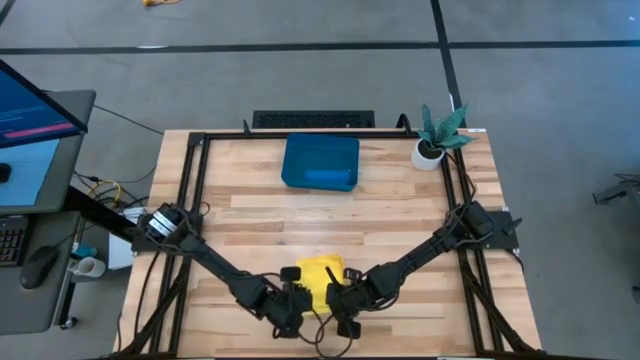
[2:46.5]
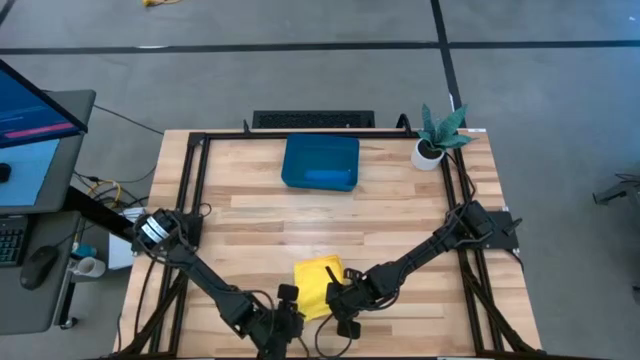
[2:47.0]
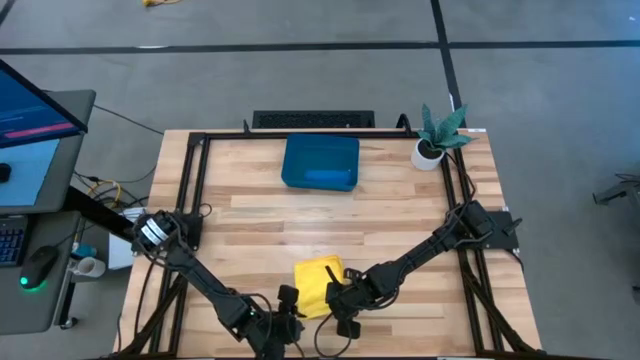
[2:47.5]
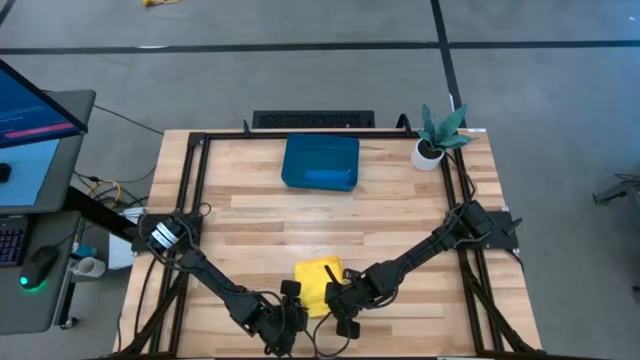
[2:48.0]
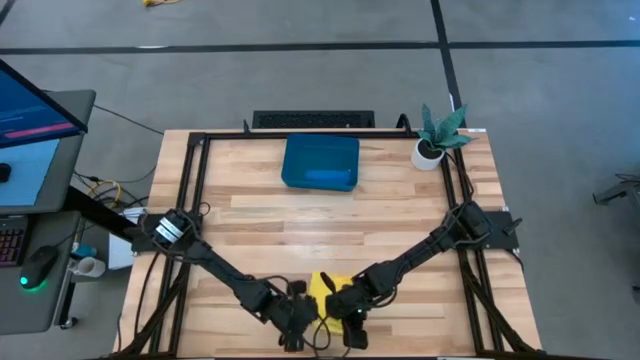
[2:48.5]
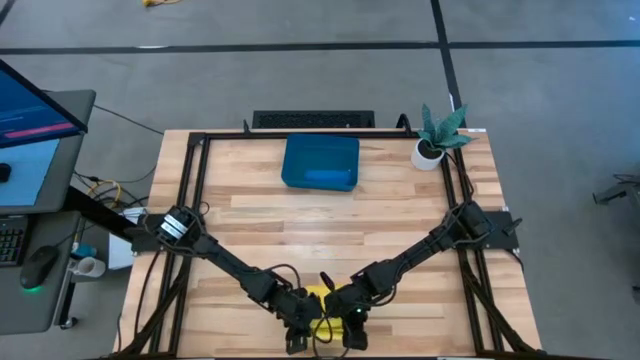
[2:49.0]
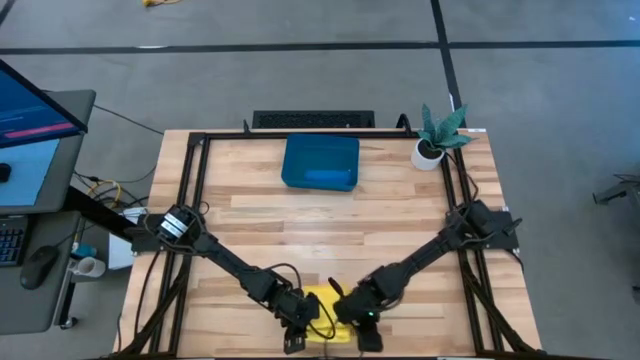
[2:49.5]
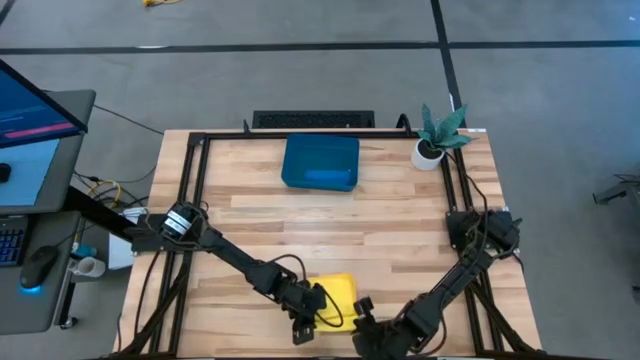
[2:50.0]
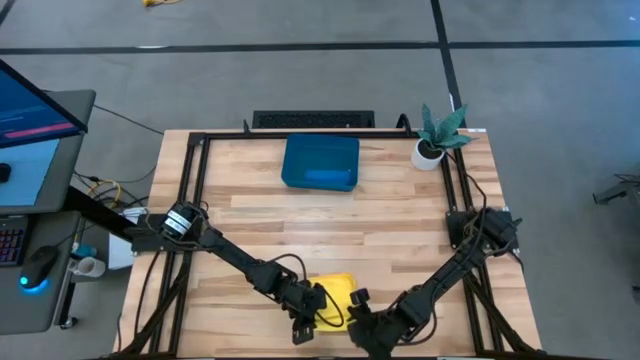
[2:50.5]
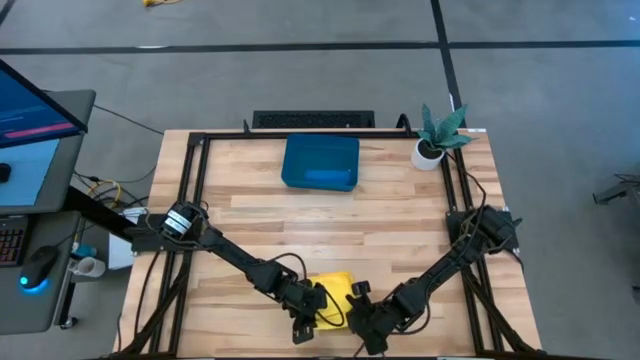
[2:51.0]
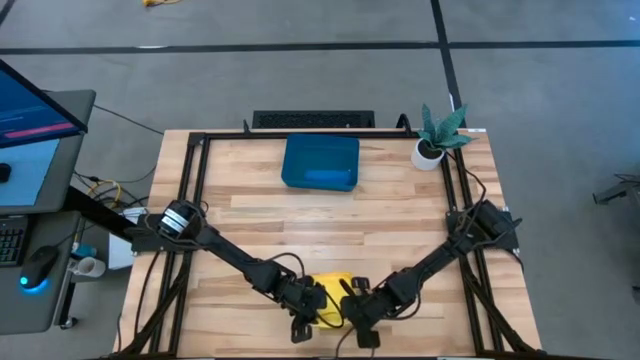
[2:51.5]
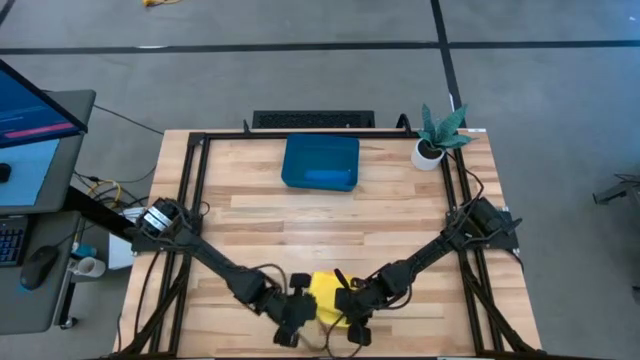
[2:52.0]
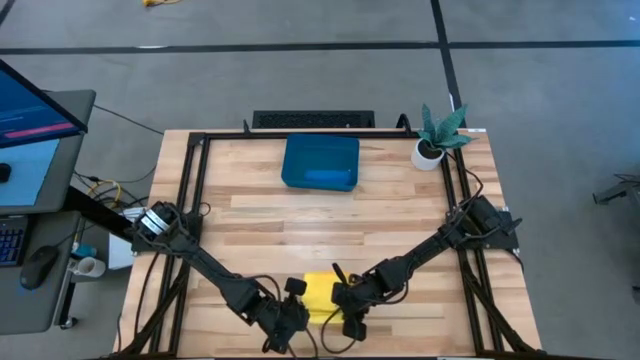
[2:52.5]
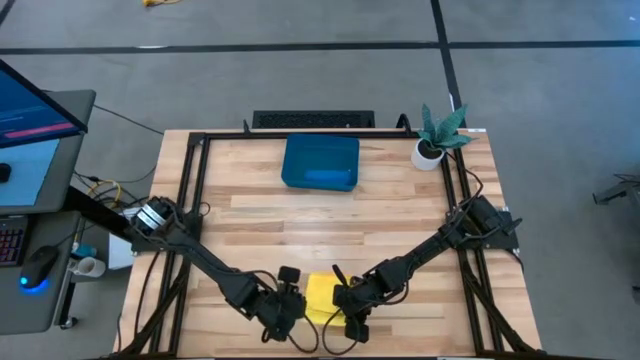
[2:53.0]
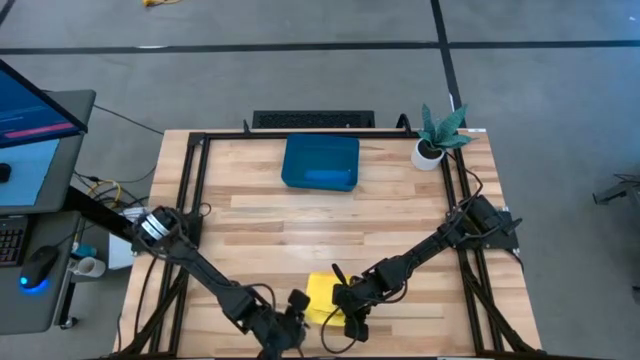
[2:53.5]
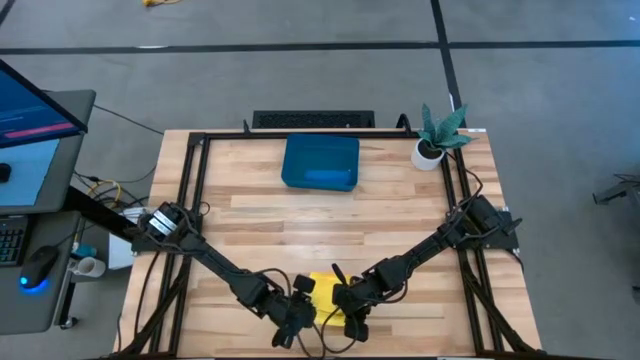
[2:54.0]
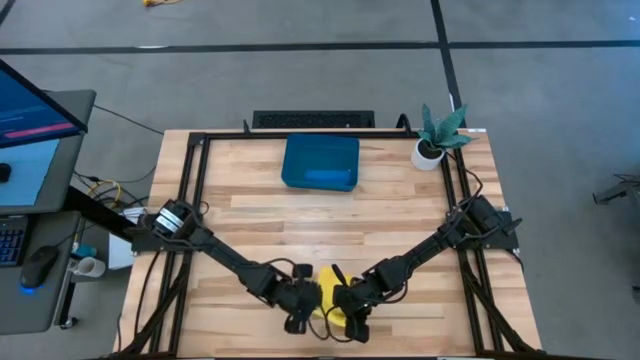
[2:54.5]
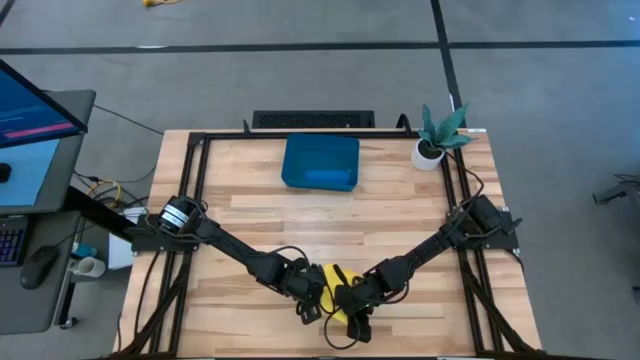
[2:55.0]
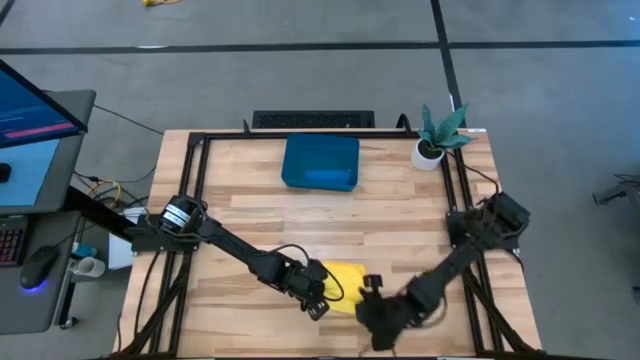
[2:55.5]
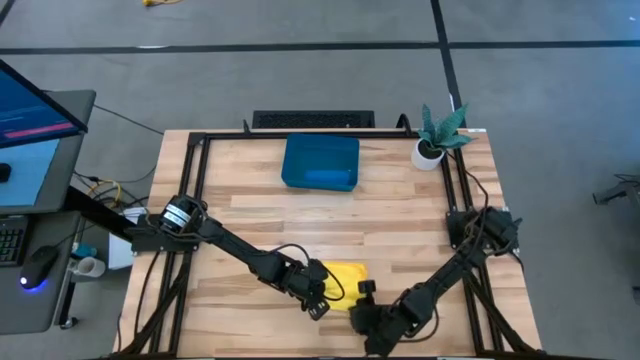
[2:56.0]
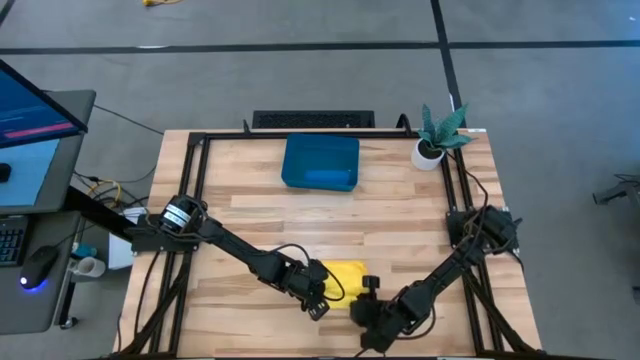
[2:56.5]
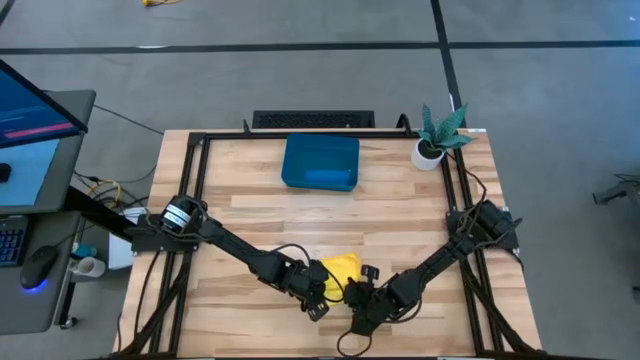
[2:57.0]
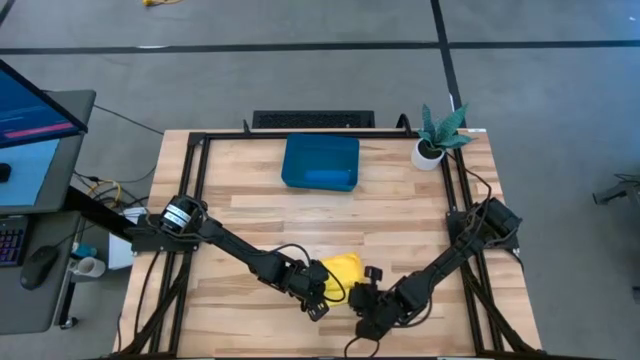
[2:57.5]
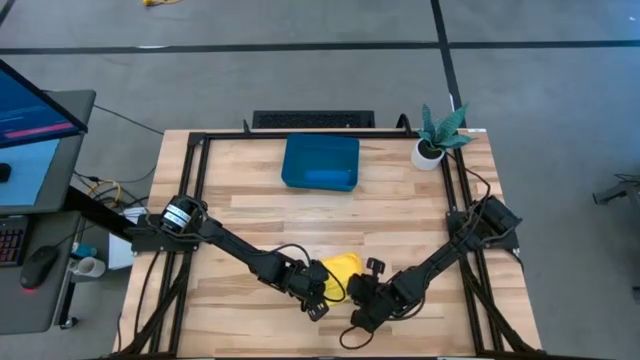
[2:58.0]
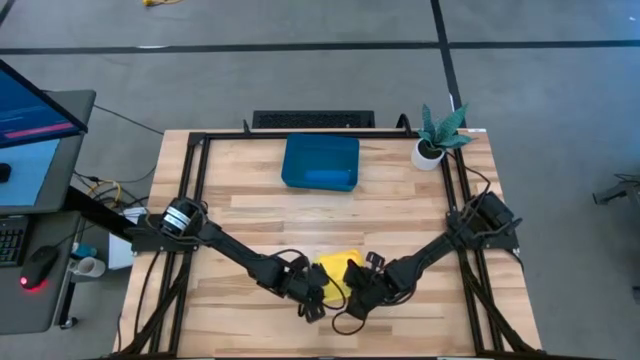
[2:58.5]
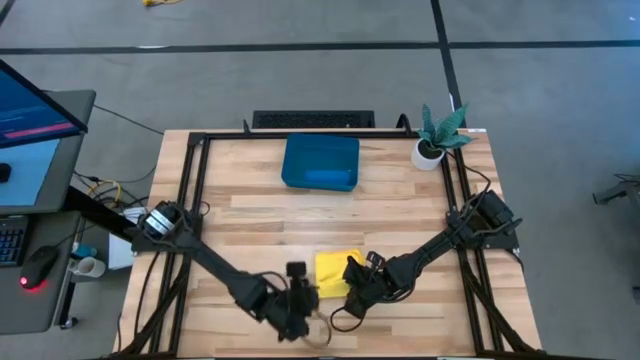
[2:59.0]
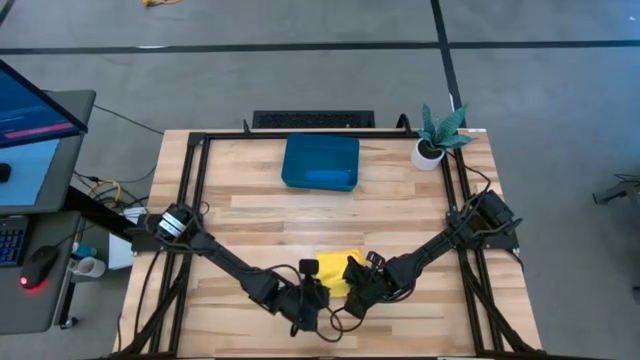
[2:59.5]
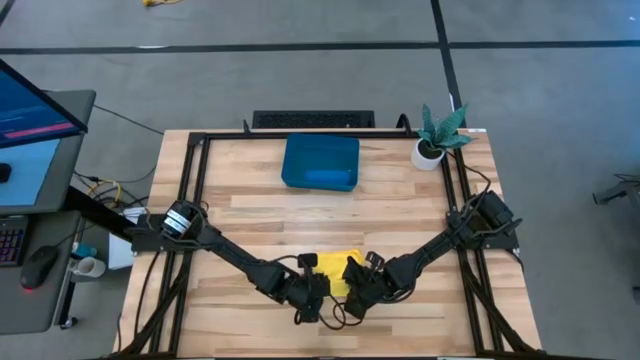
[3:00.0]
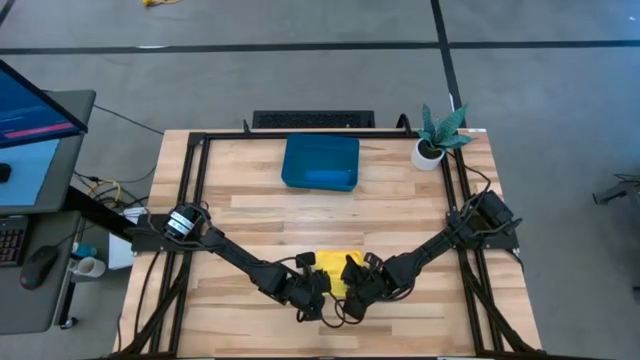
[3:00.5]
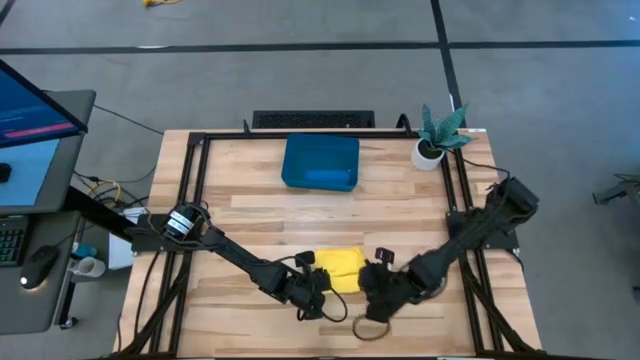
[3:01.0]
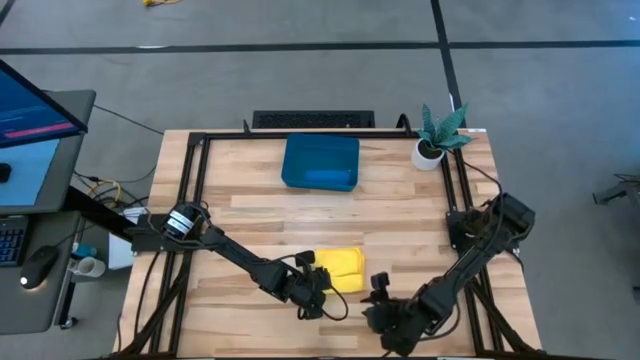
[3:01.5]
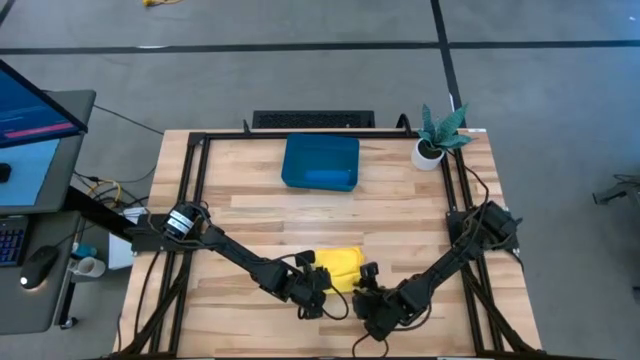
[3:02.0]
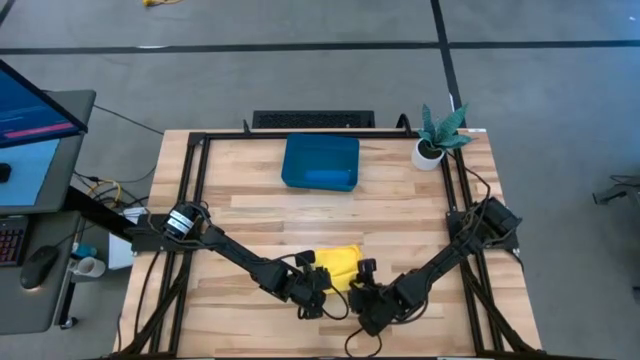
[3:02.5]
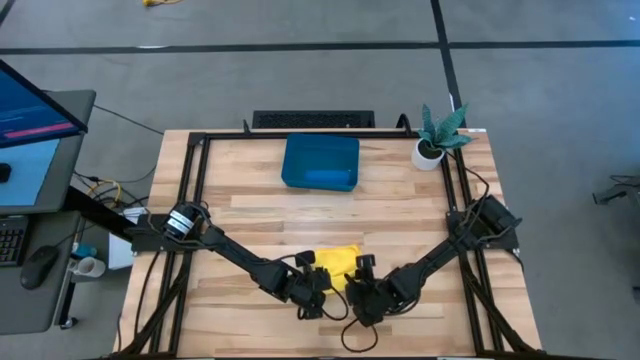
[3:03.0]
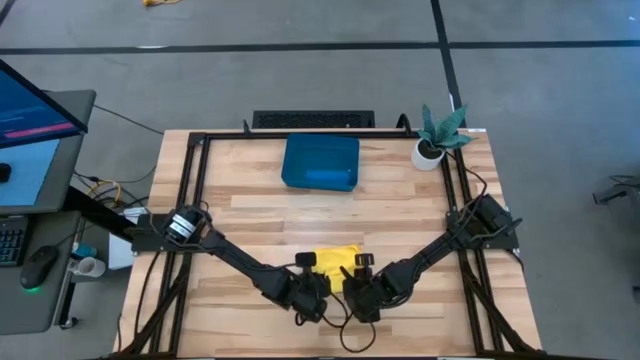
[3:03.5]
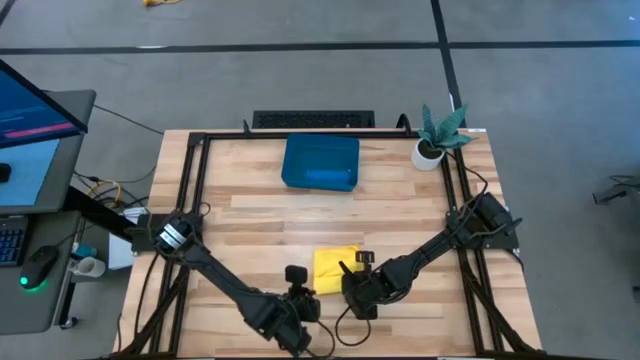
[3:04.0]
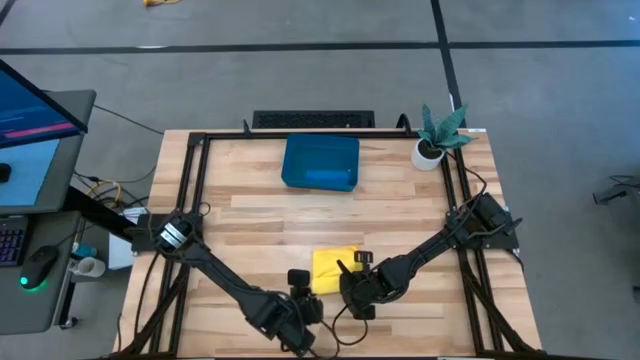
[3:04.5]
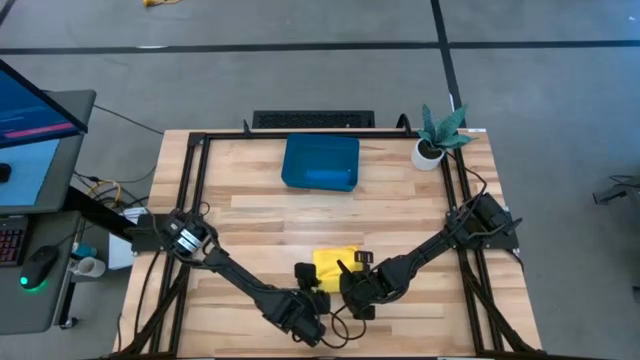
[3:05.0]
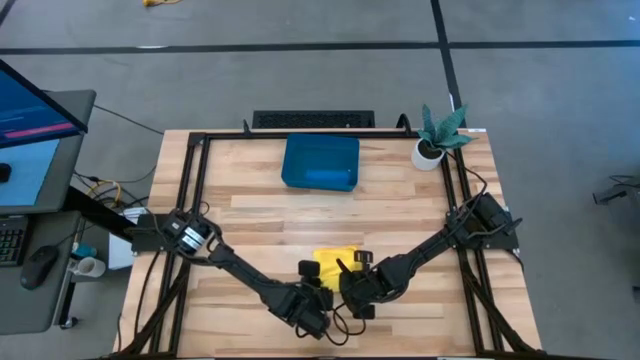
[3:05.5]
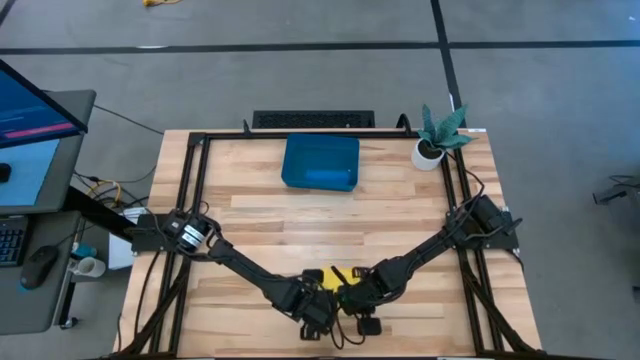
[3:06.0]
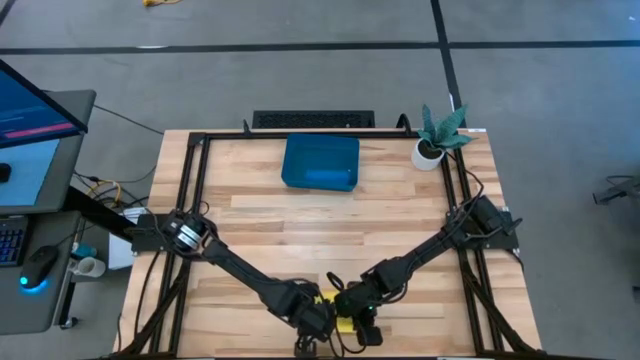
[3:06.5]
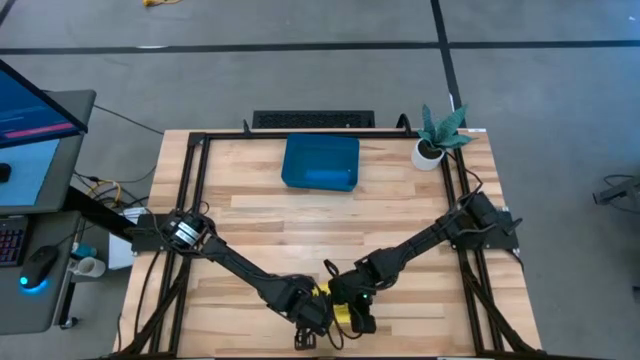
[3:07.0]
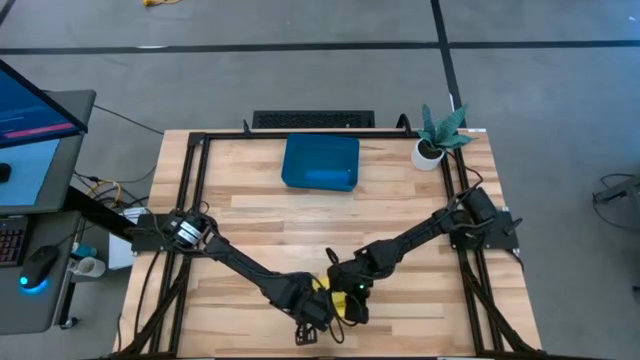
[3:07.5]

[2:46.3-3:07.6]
Task: Roll microfiber towels into tight, uniform cylinder then place into a basket
Roll the yellow microfiber cloth
